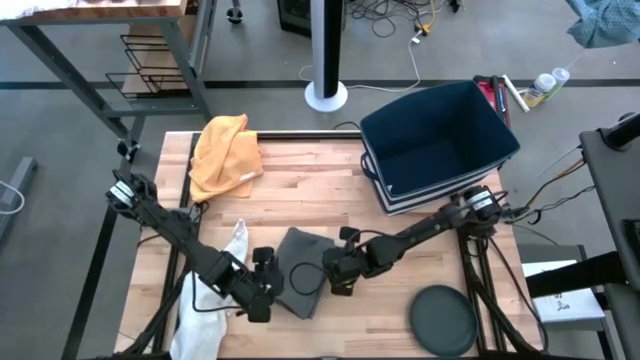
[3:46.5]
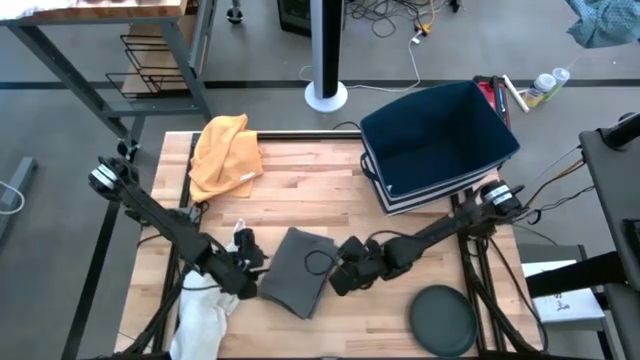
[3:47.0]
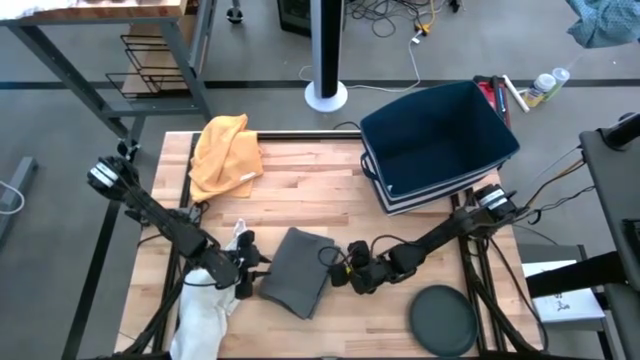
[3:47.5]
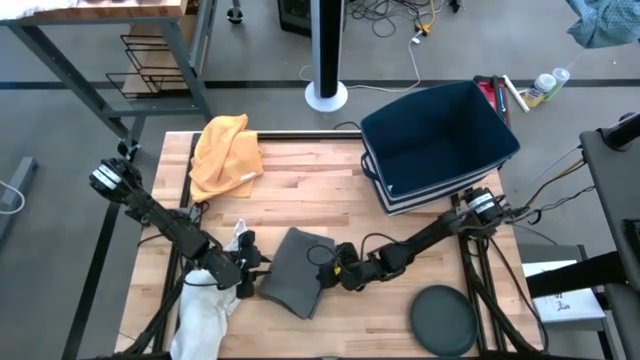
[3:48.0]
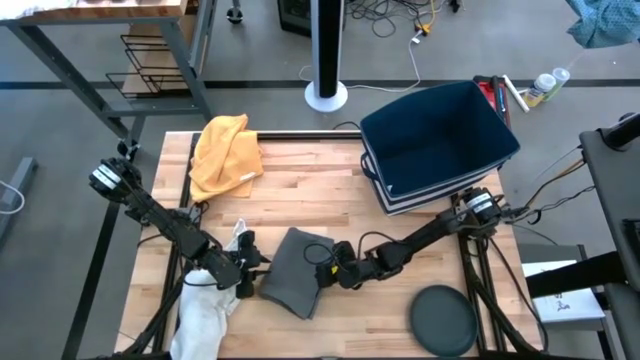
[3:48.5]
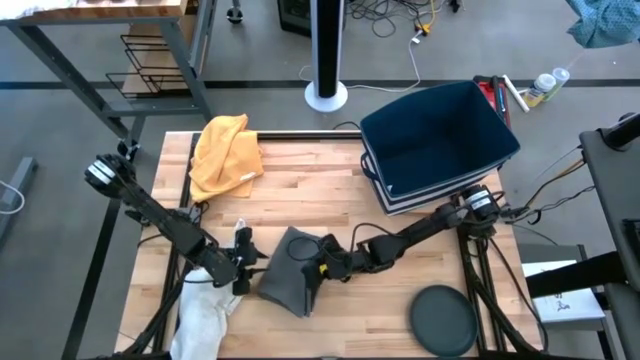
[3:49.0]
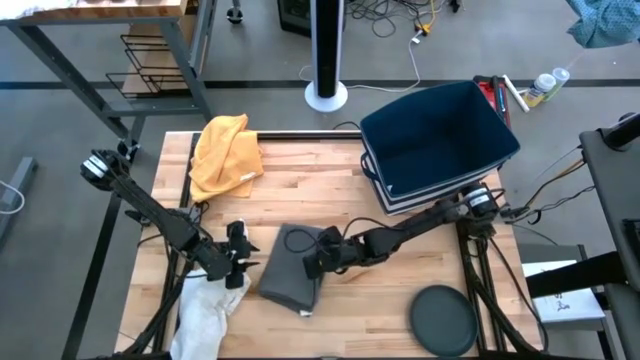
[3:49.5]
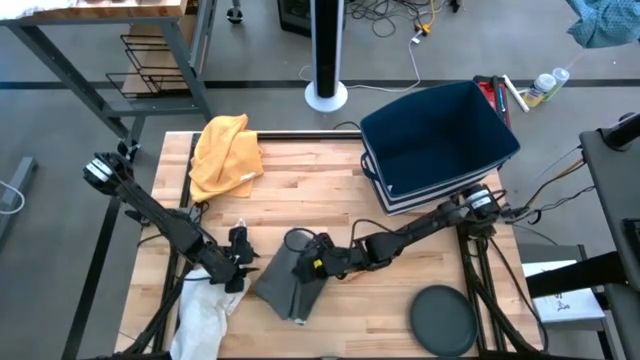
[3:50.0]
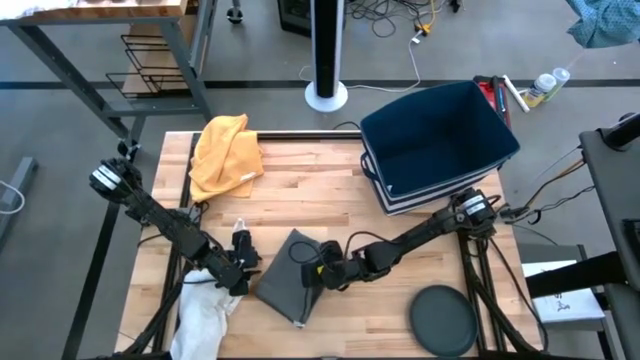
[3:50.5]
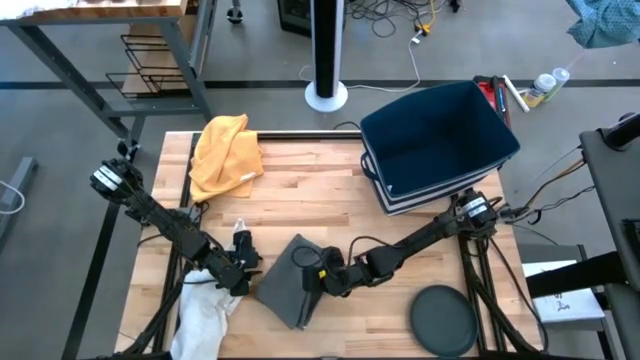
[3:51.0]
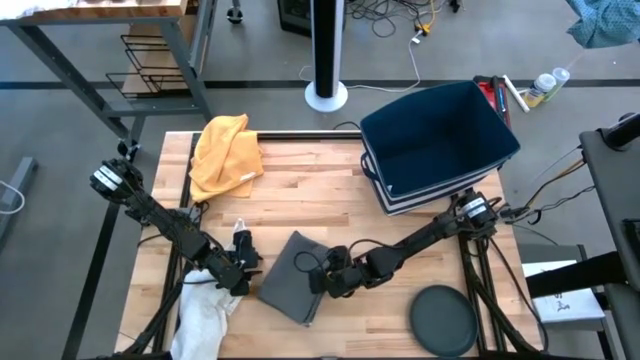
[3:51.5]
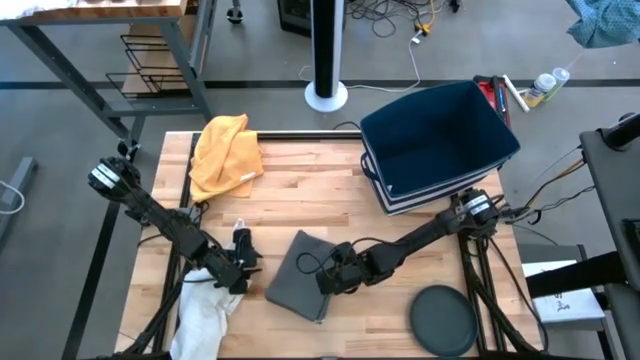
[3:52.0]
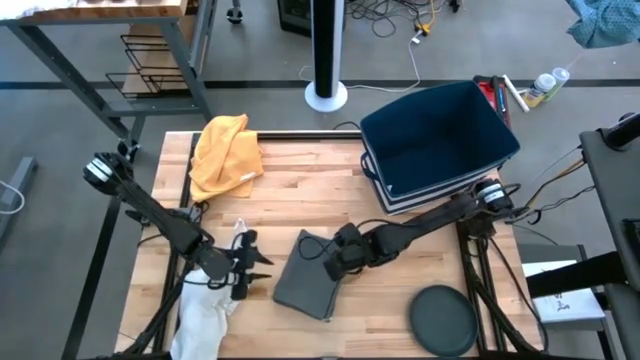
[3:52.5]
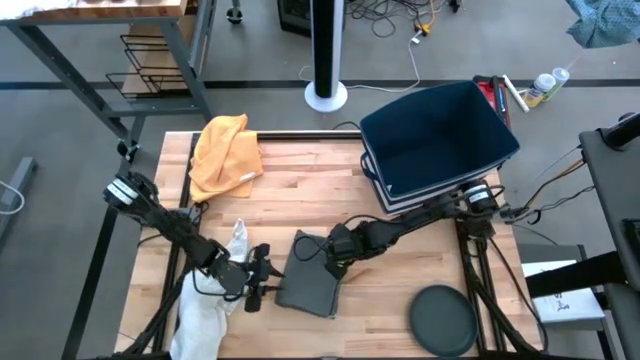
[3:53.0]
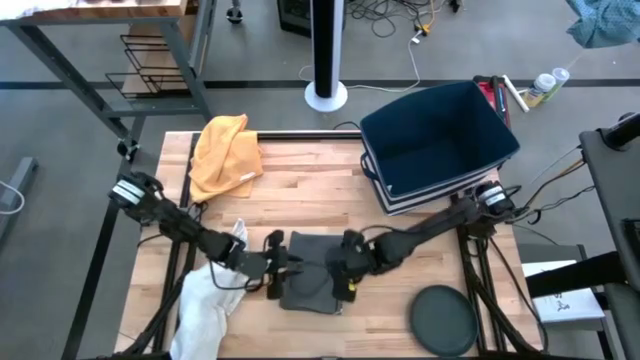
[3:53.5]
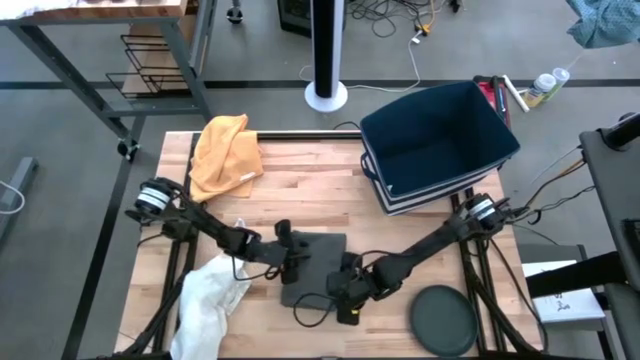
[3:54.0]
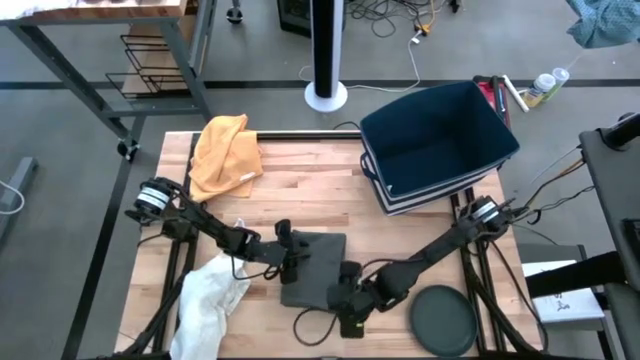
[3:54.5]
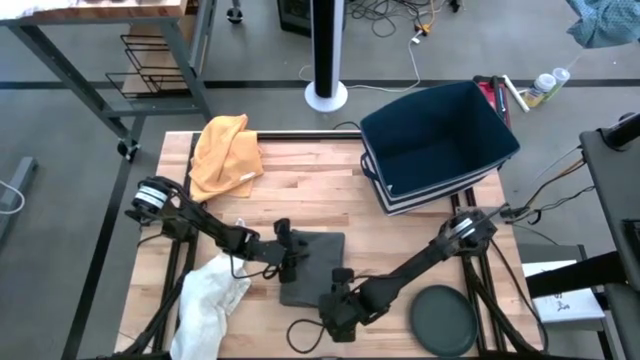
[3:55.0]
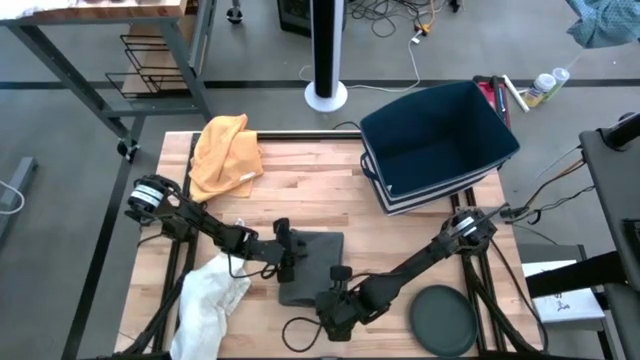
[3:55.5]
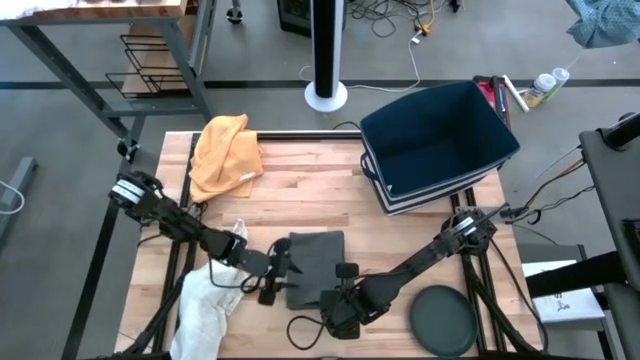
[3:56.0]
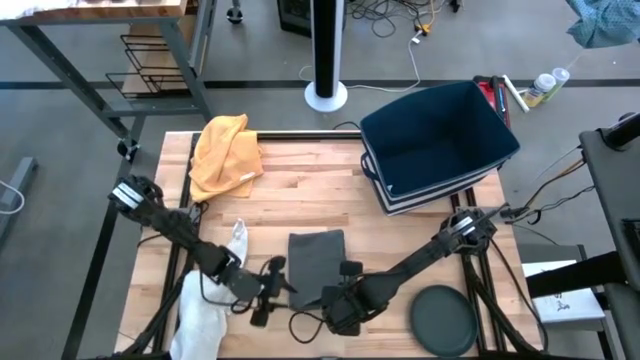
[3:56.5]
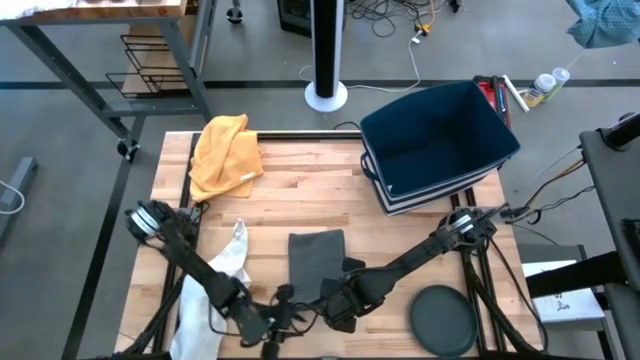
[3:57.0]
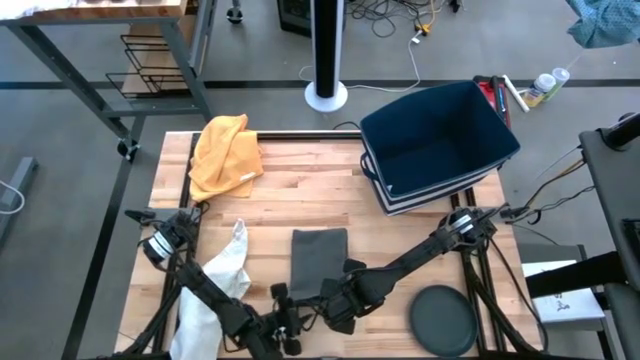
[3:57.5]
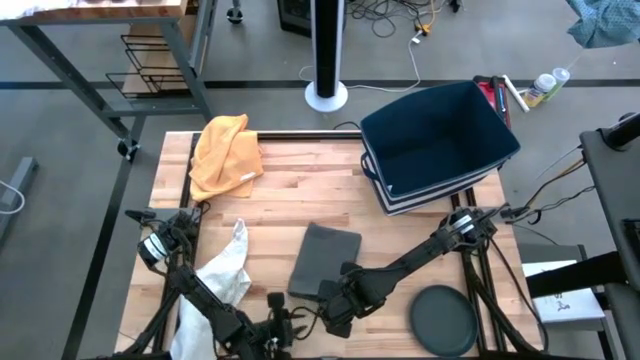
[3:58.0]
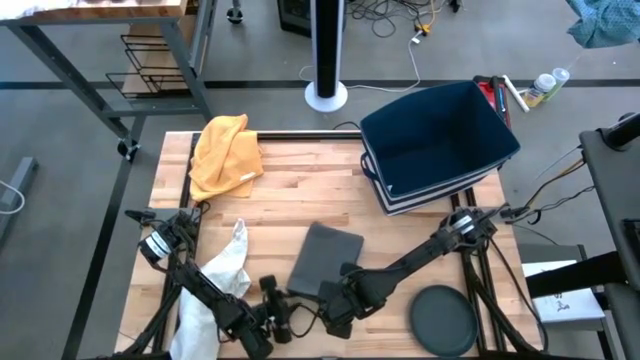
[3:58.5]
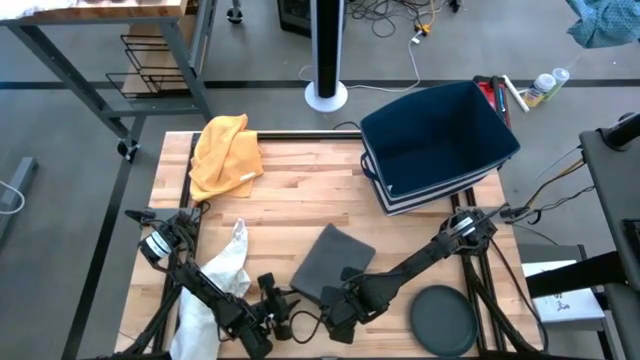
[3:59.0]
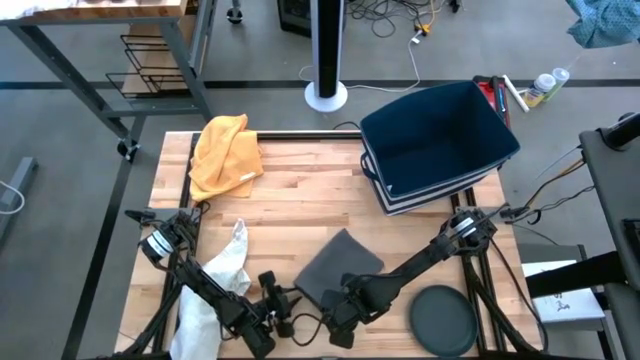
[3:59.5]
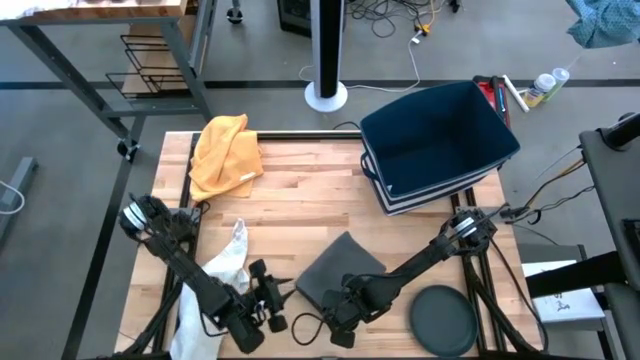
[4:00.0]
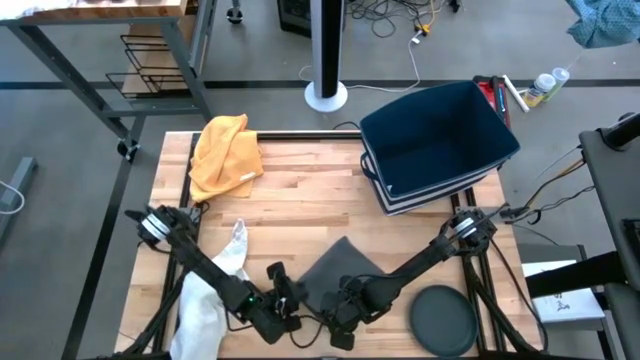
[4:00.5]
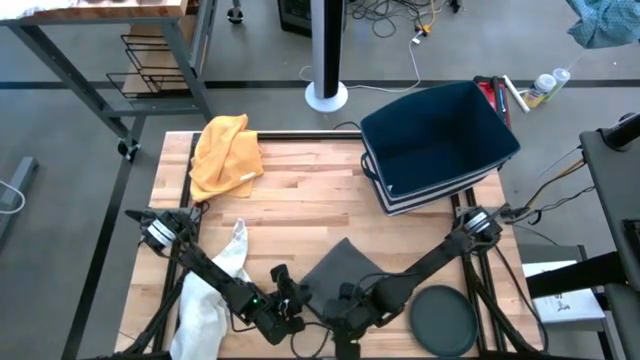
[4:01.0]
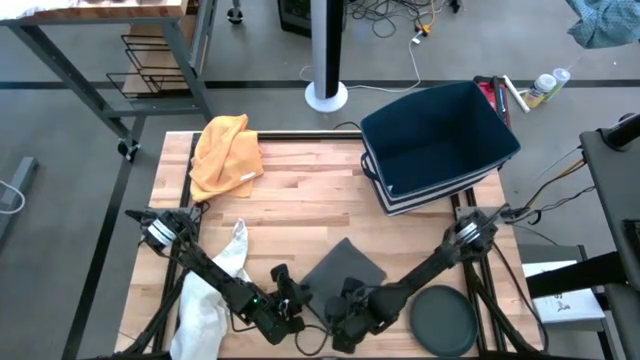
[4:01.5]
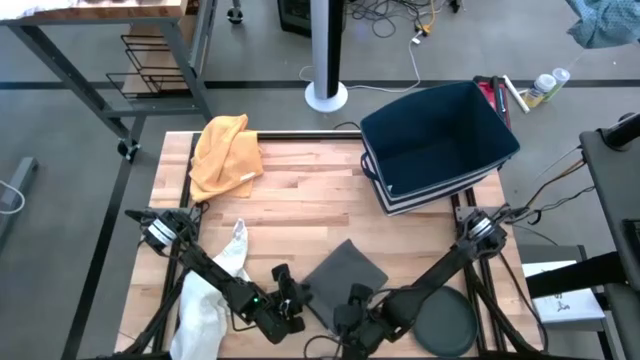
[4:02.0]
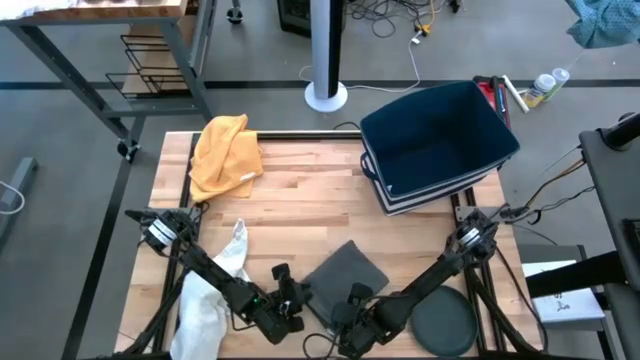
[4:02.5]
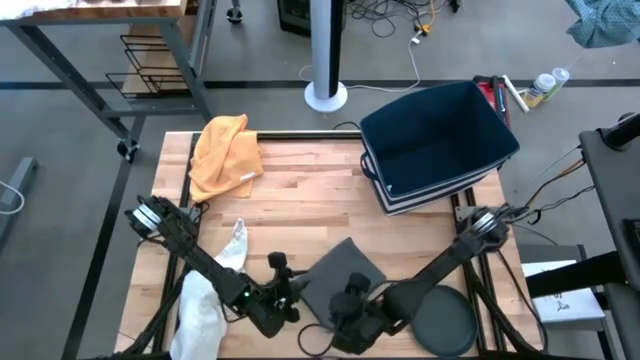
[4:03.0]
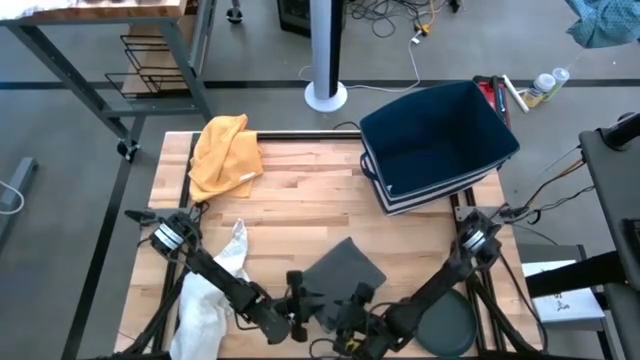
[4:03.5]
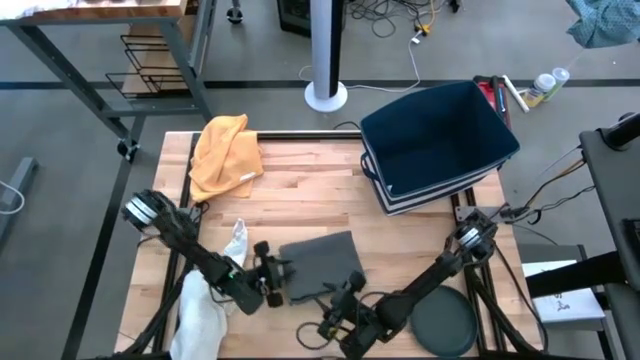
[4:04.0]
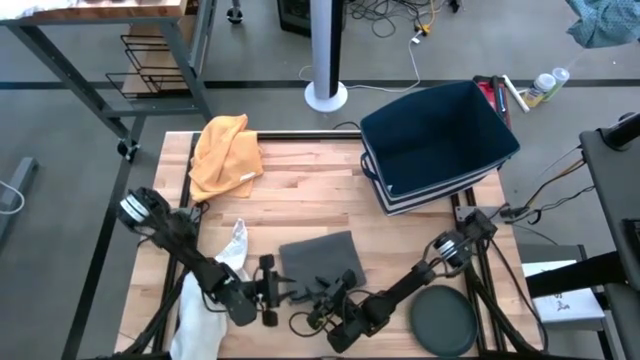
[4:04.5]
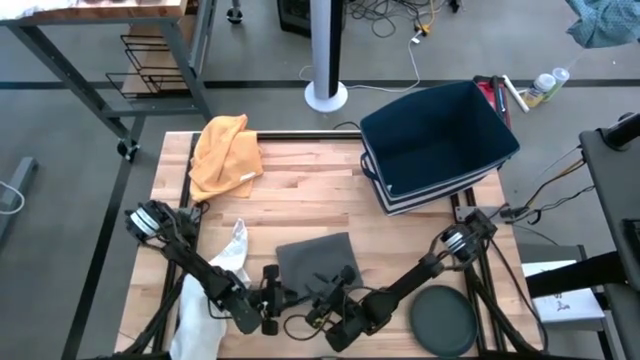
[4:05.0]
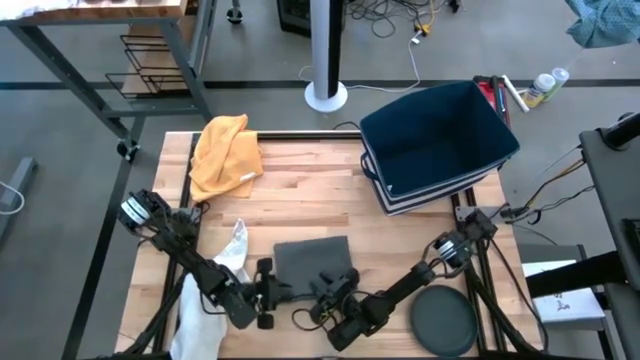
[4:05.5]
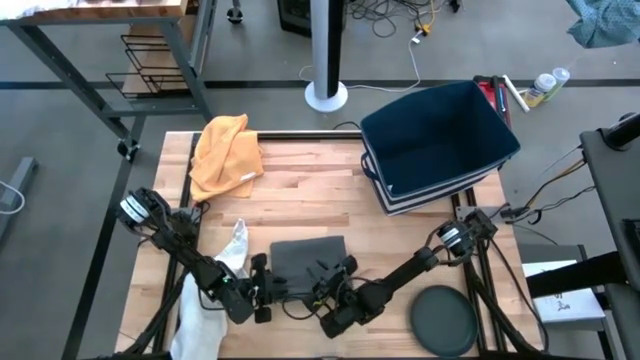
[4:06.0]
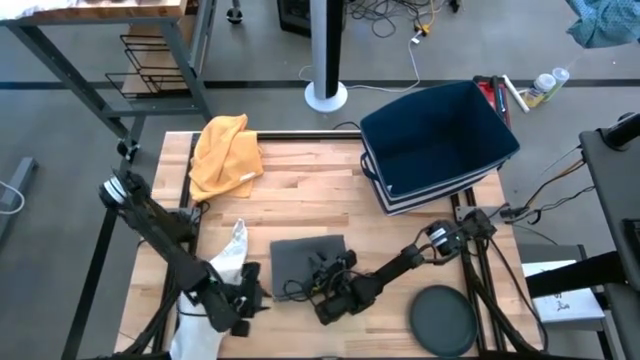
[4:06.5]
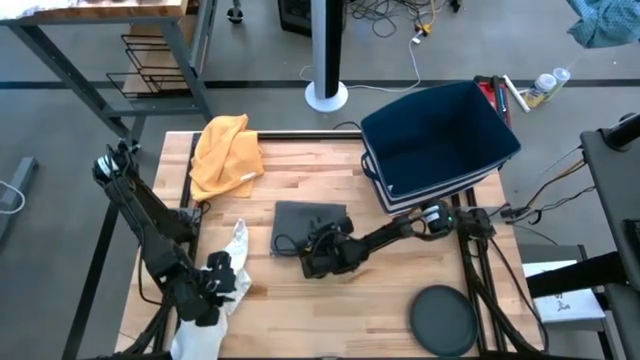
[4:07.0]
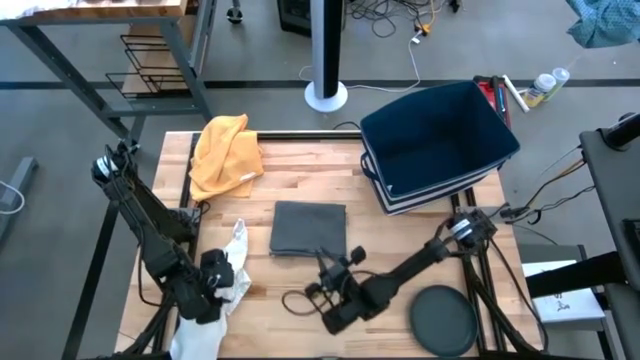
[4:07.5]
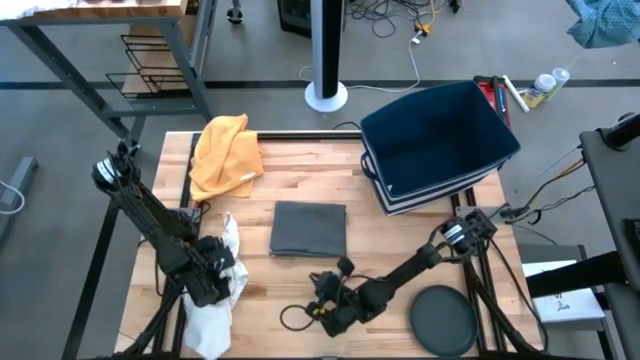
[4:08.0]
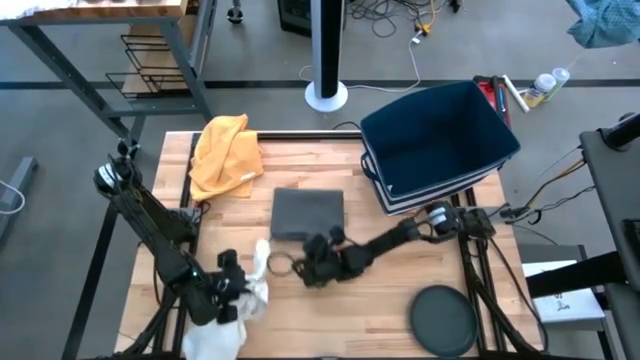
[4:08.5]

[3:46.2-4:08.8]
Task: Fold kitchen towel into neat rectangle
Fold the gray towel
